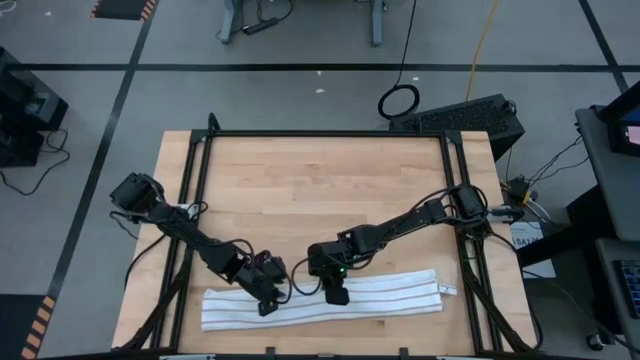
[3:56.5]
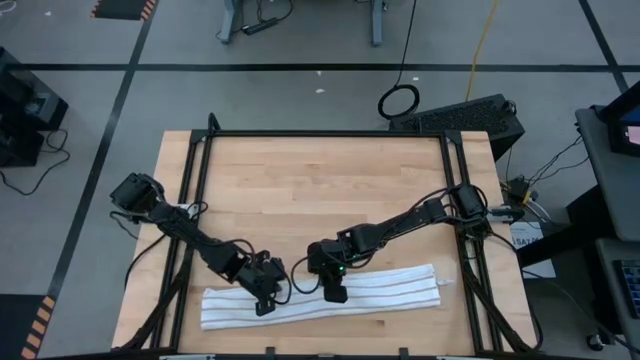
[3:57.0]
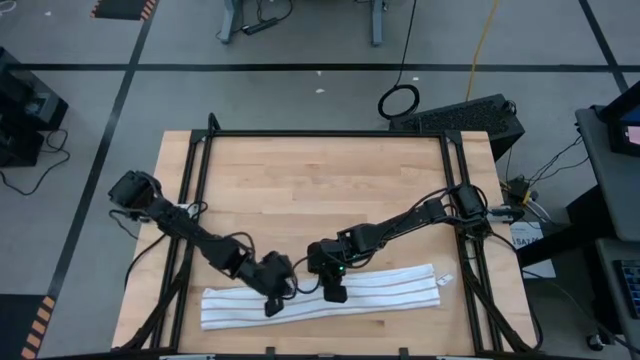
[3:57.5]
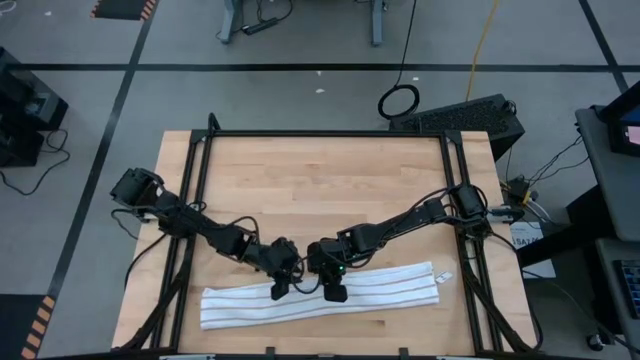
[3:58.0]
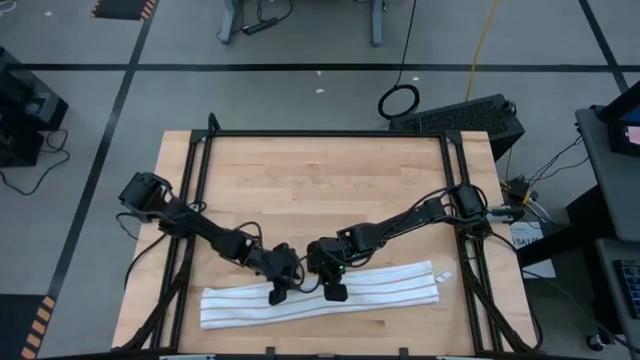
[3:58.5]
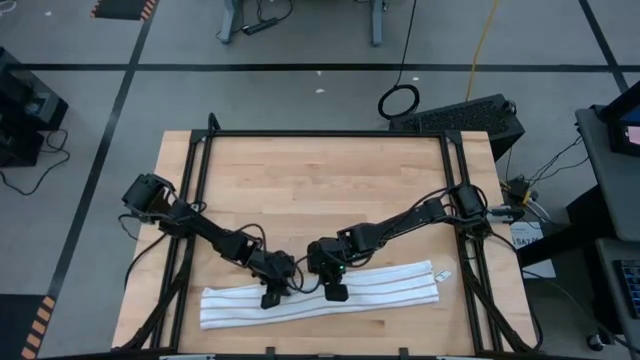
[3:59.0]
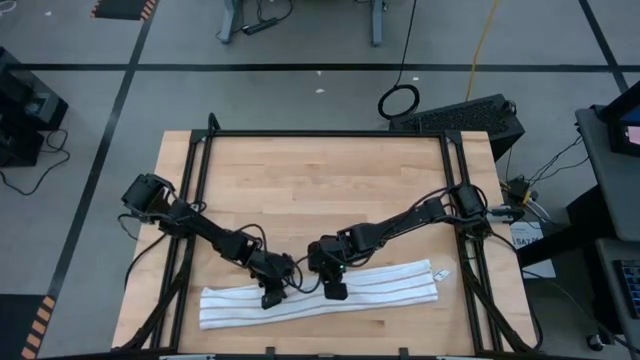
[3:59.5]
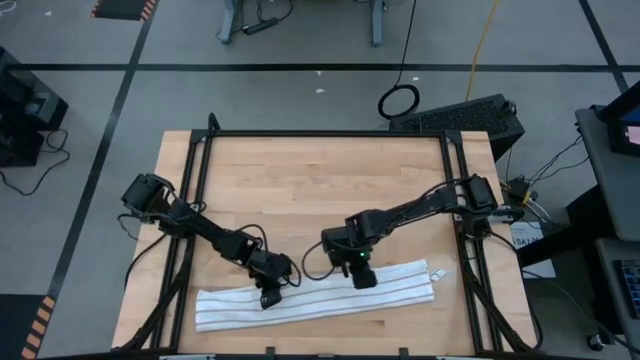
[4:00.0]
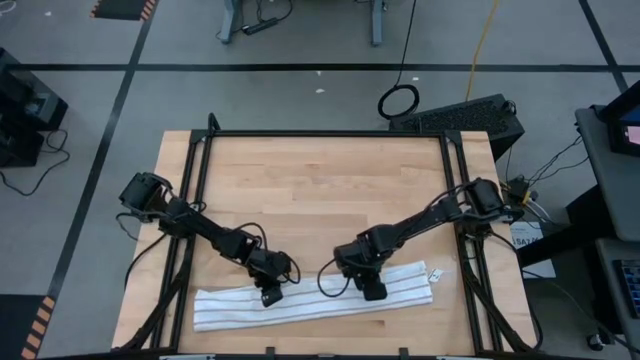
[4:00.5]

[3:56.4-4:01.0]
Task: Roll towel into tight, uniform cylinder
Fold the white brown kitchen towel

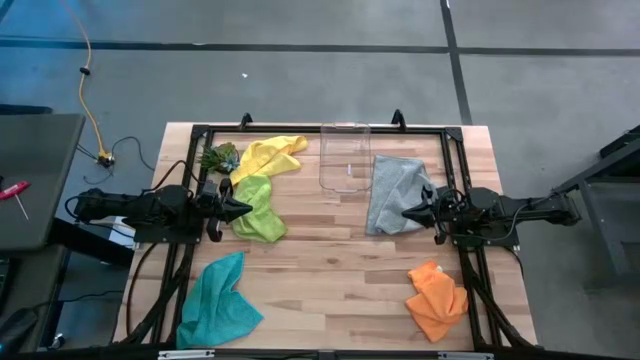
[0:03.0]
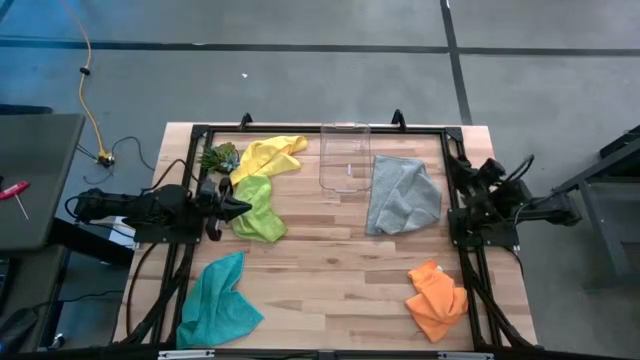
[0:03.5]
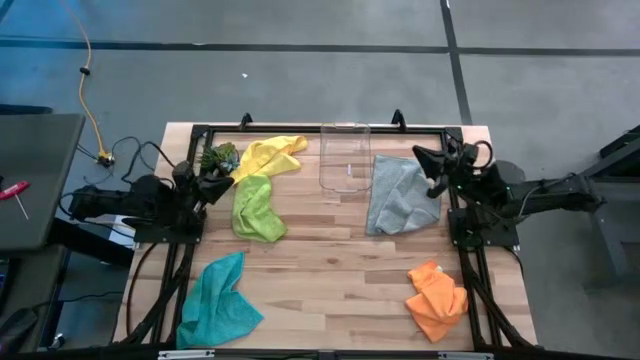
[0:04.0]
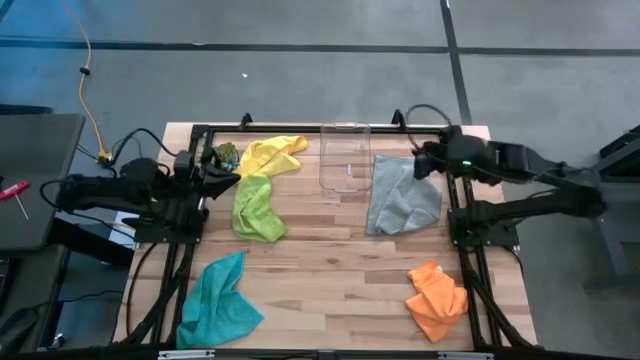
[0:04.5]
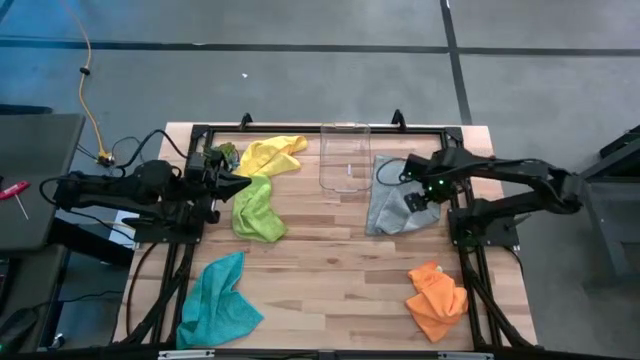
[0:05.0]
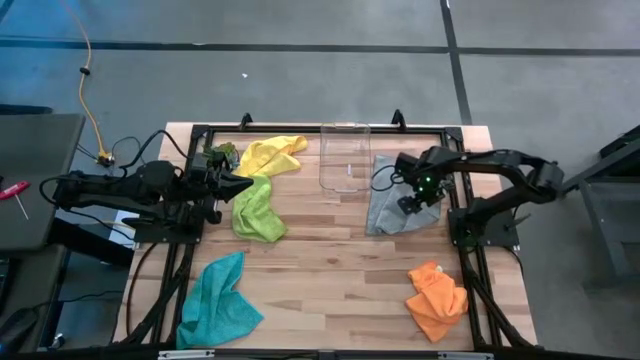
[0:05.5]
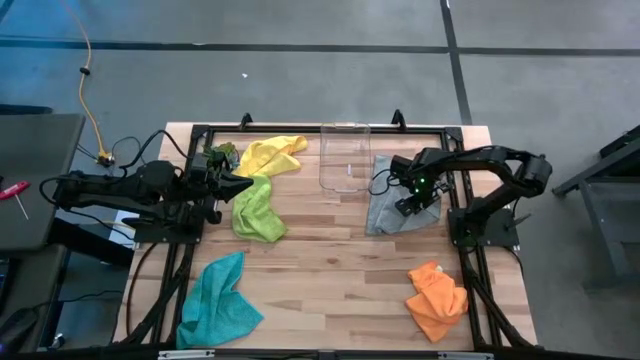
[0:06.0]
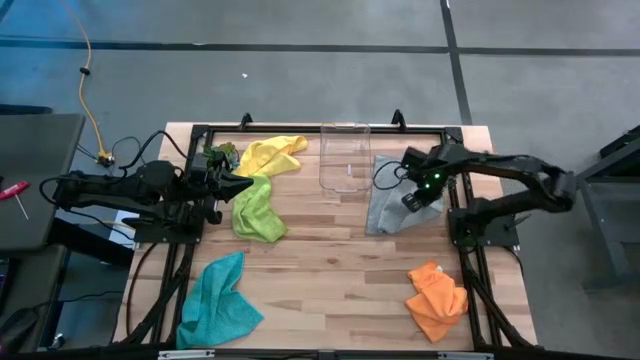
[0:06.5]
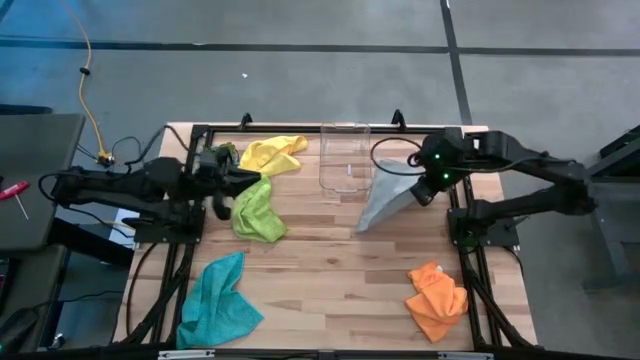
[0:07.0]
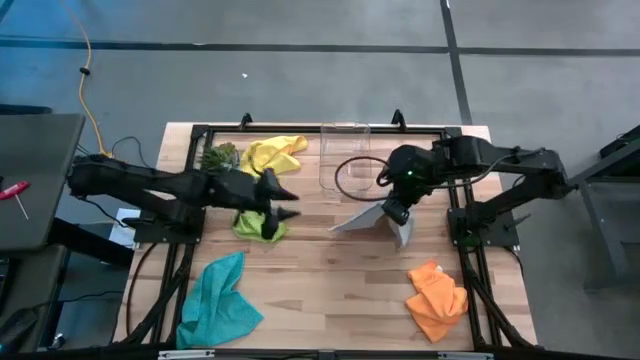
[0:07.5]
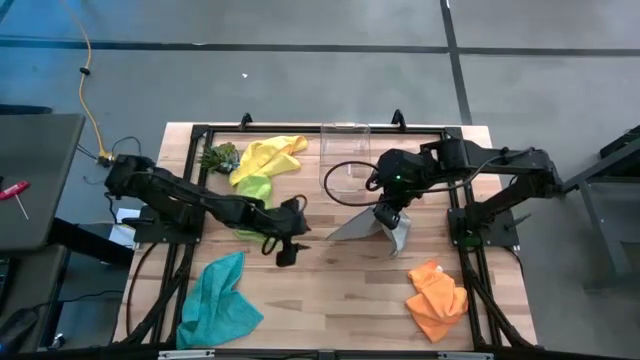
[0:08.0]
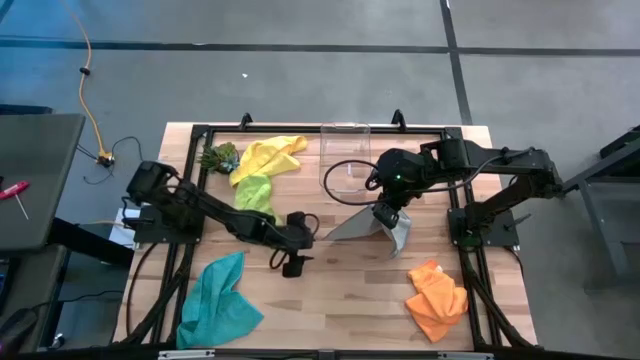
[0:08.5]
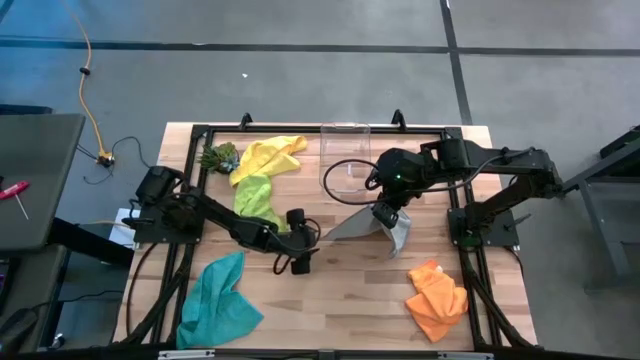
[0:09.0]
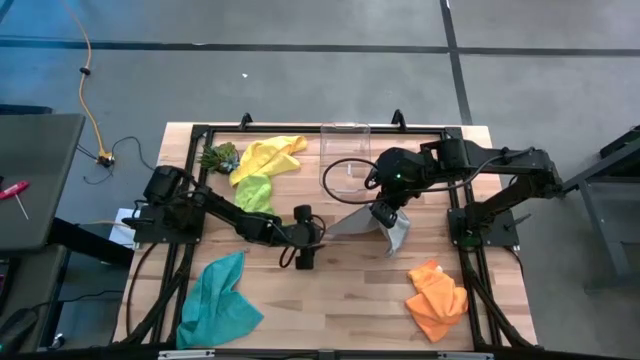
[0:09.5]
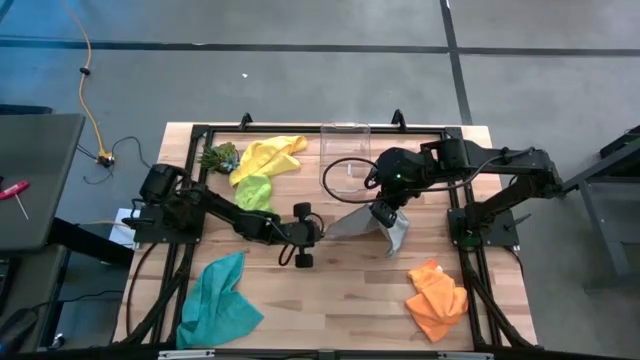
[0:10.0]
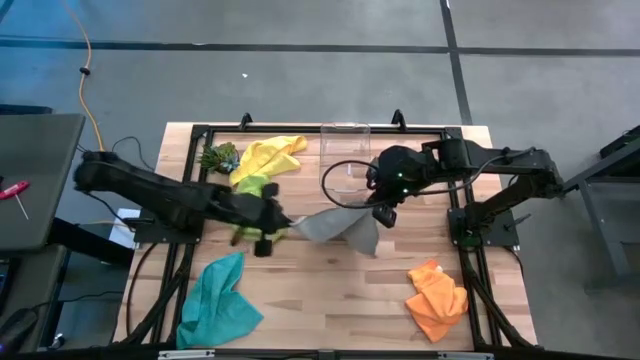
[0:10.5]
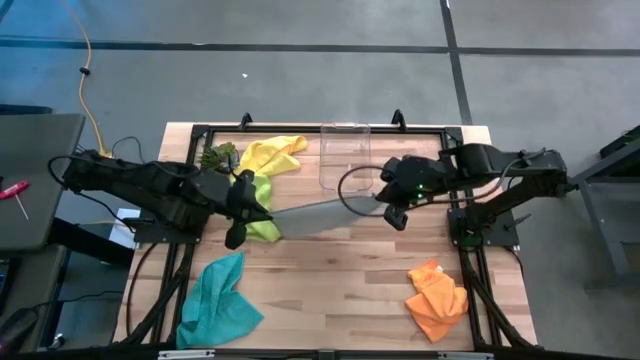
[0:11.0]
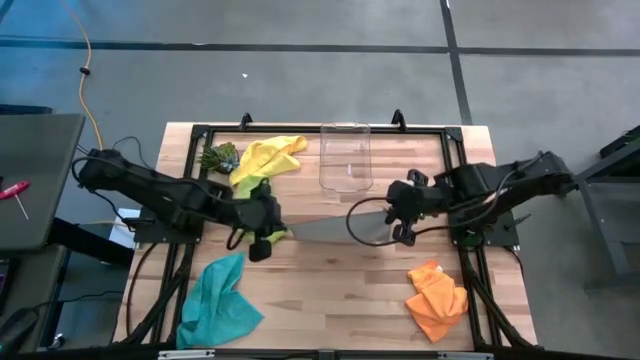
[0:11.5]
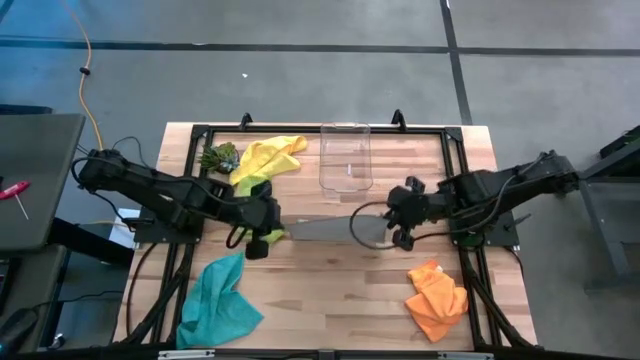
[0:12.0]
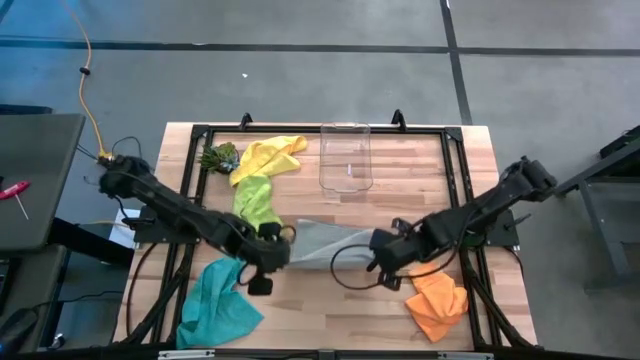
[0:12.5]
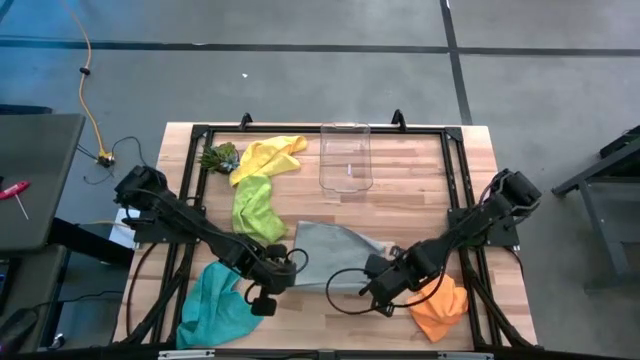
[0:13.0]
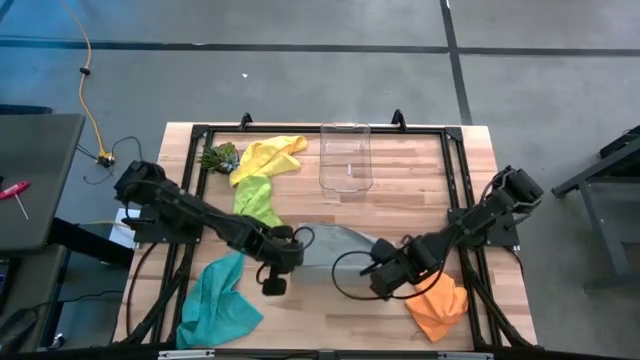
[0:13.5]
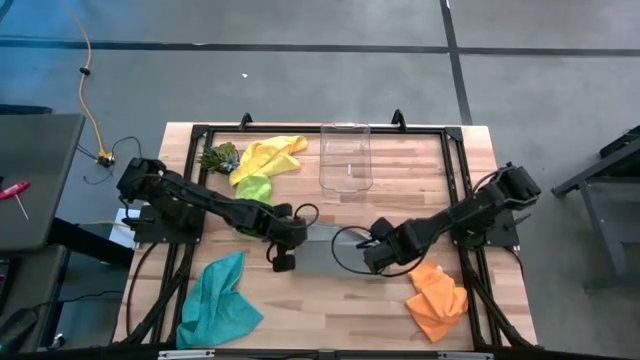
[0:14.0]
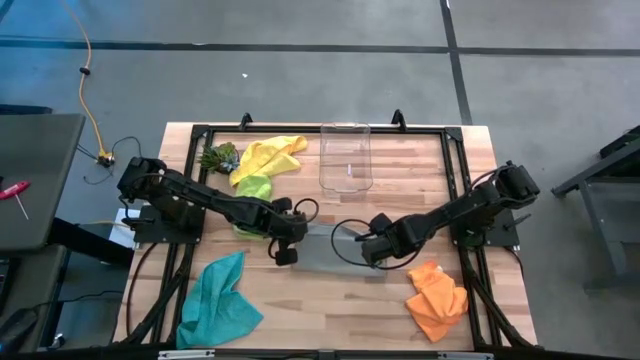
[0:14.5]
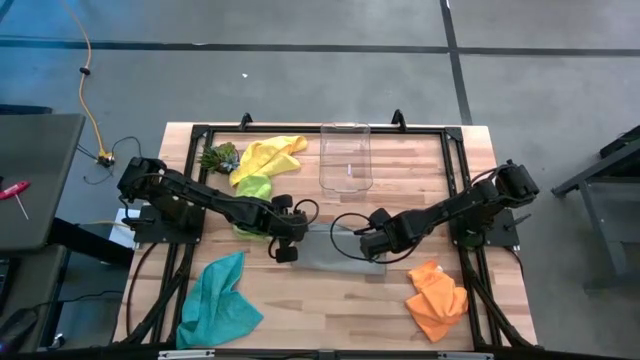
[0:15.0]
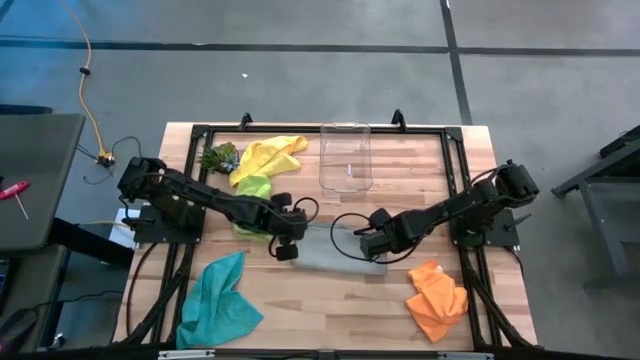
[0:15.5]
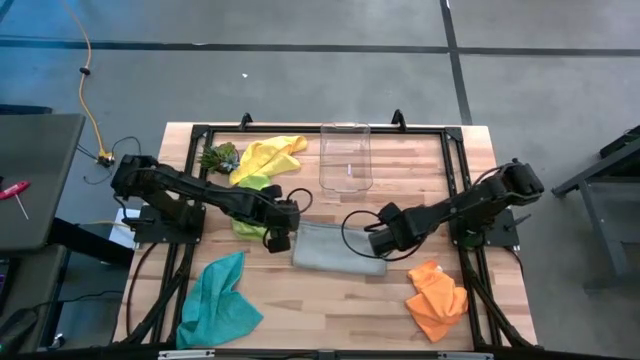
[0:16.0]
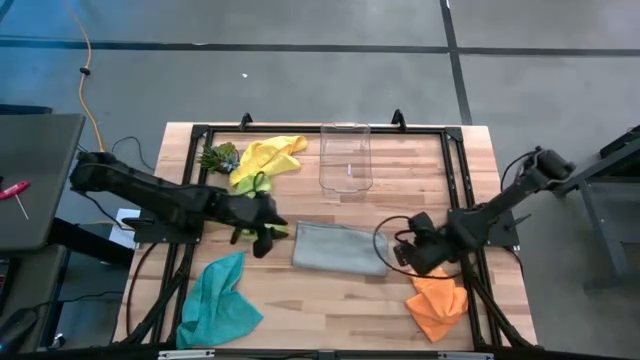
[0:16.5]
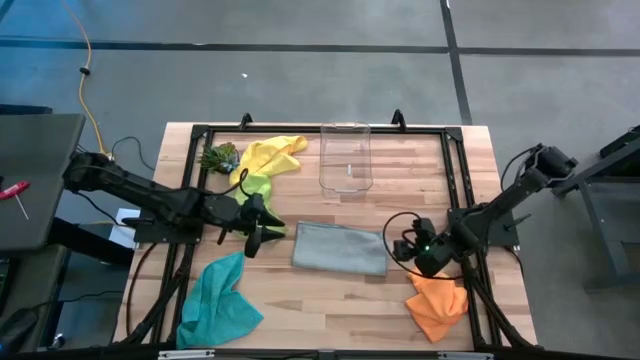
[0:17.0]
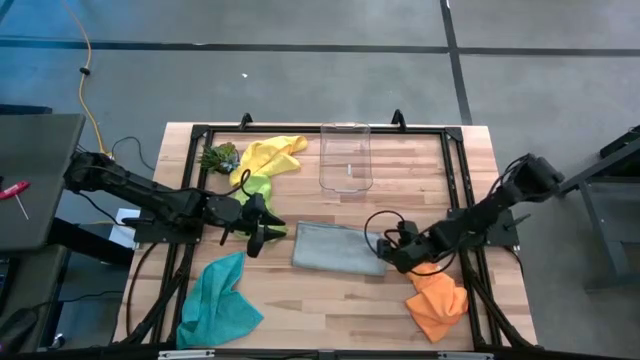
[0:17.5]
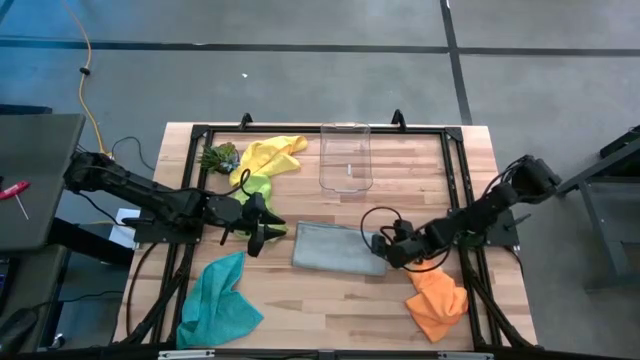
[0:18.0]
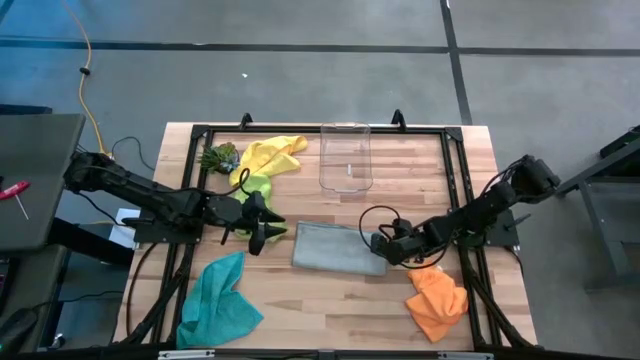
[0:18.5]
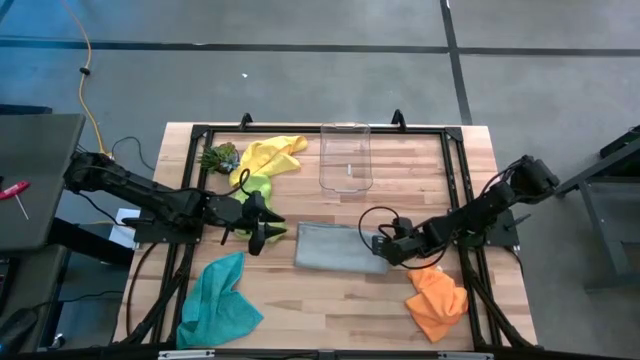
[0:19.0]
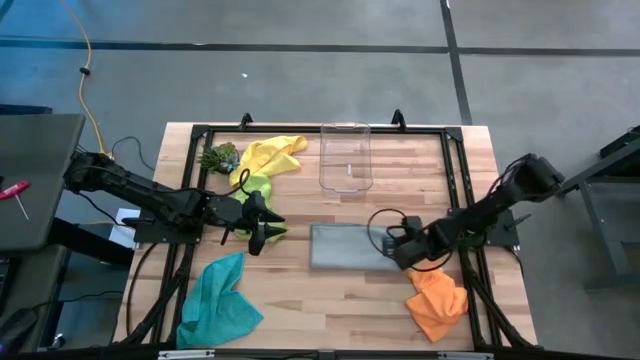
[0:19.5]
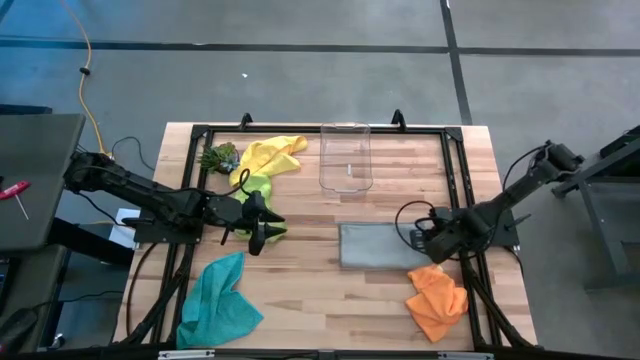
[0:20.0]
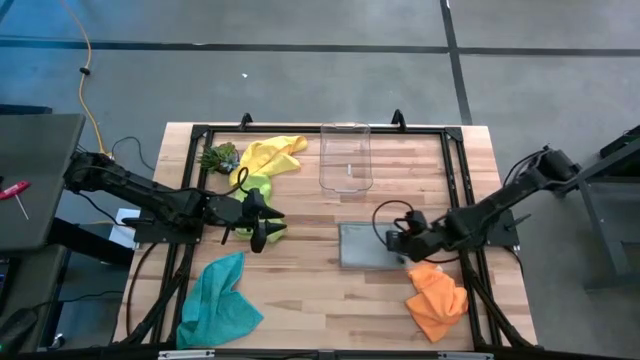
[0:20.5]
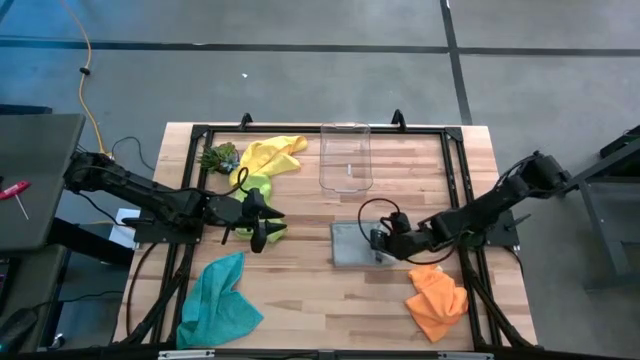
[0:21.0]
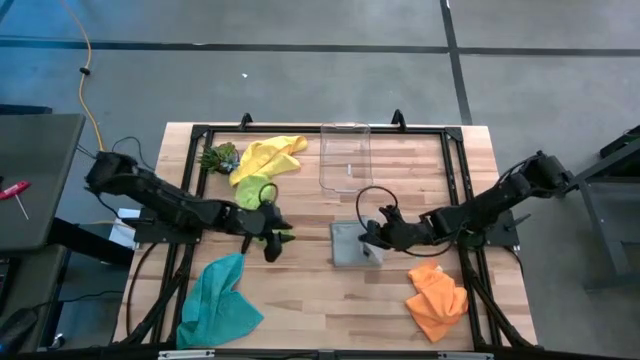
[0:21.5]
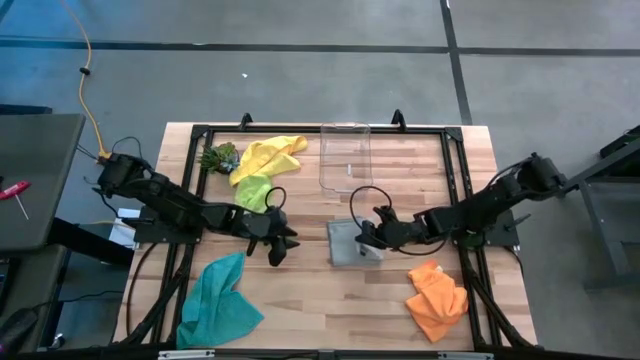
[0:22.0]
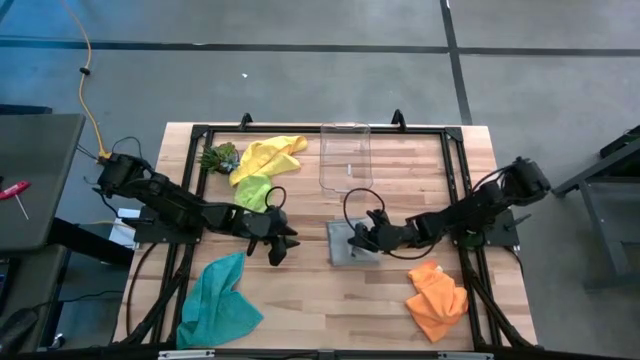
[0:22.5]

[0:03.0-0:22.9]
Task: Fold microfiber towels
Fold the gray microfiber cloth
